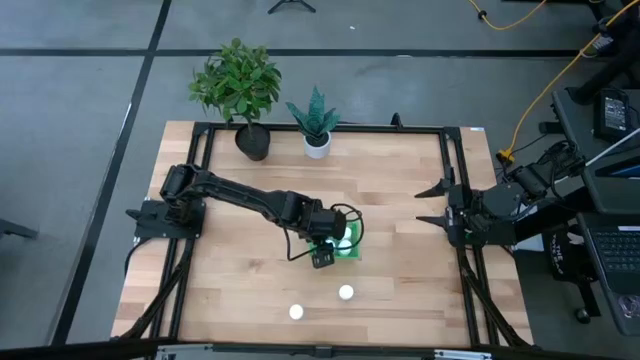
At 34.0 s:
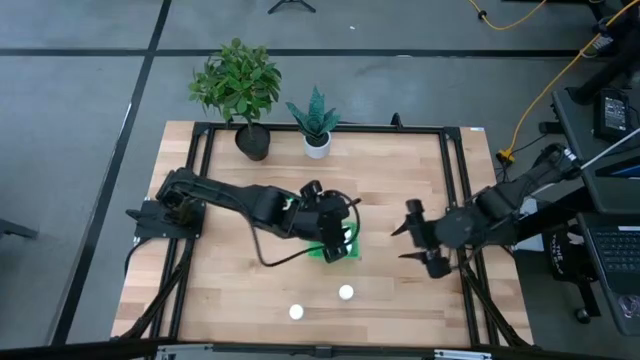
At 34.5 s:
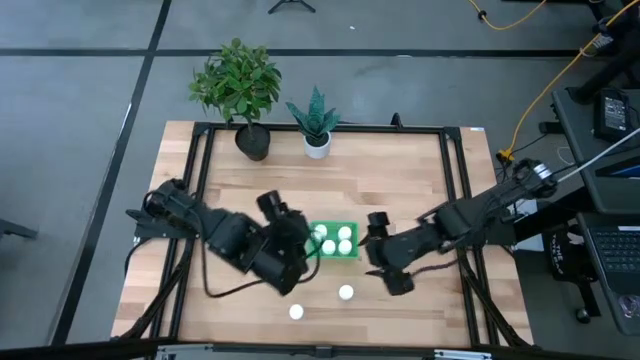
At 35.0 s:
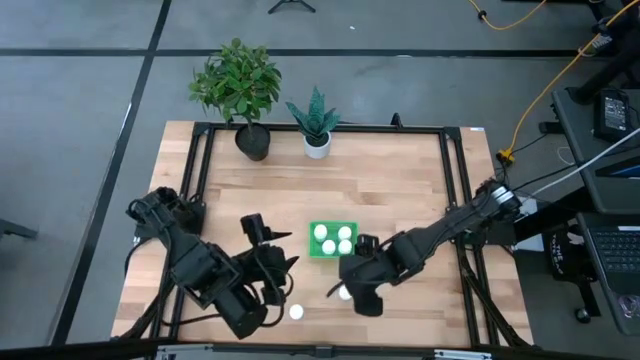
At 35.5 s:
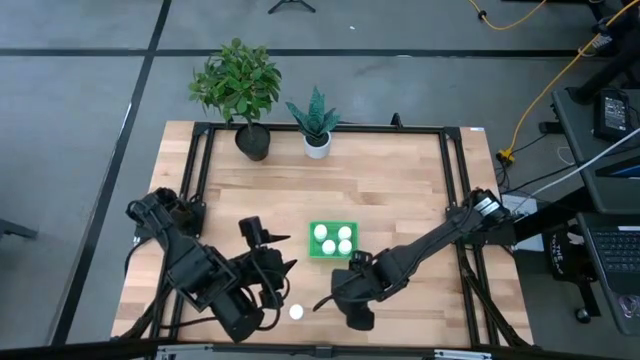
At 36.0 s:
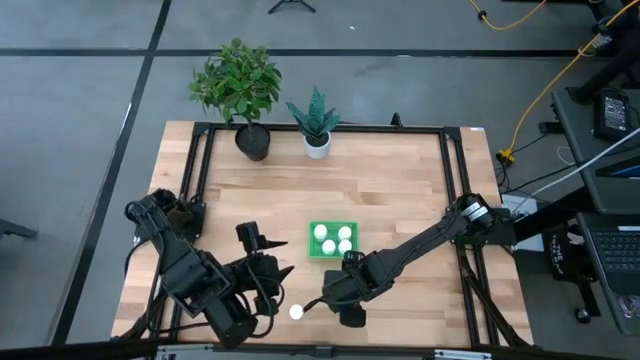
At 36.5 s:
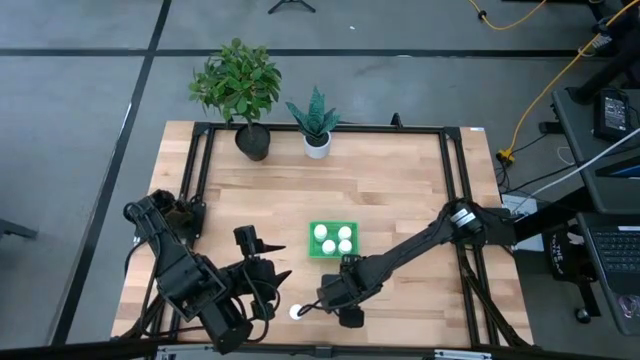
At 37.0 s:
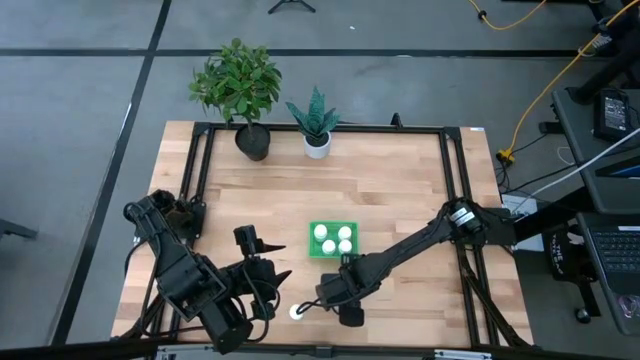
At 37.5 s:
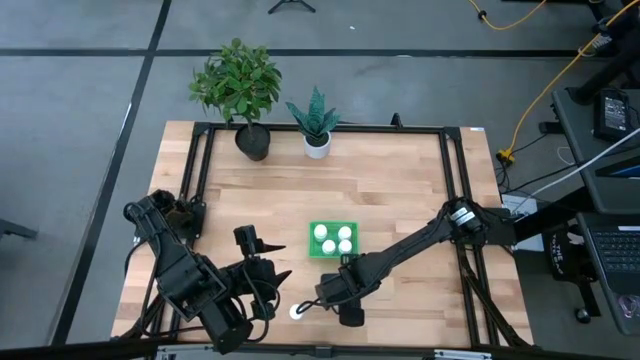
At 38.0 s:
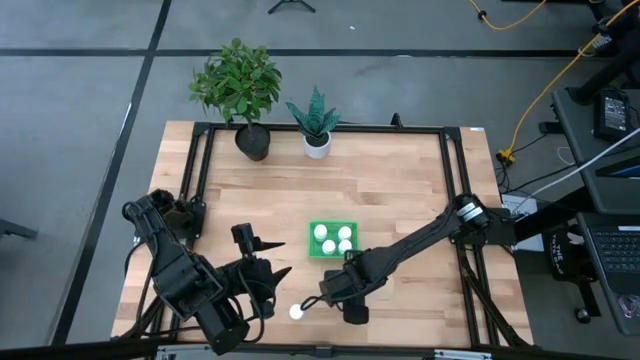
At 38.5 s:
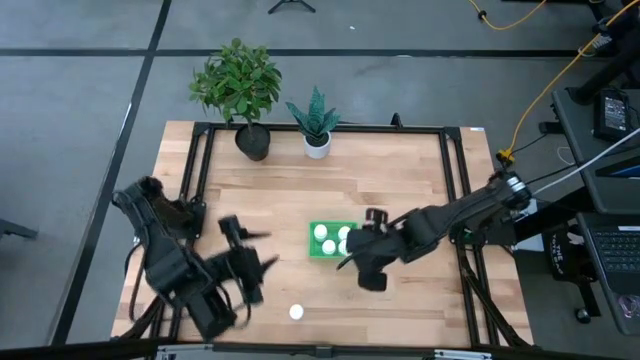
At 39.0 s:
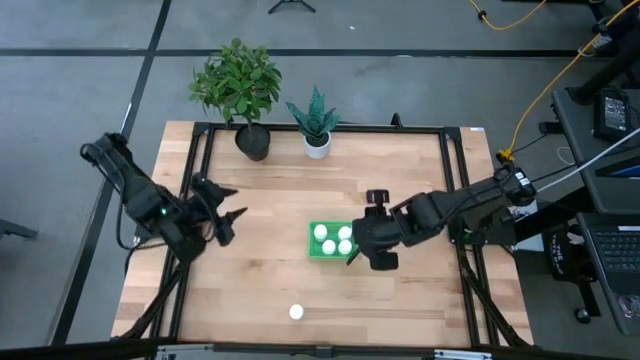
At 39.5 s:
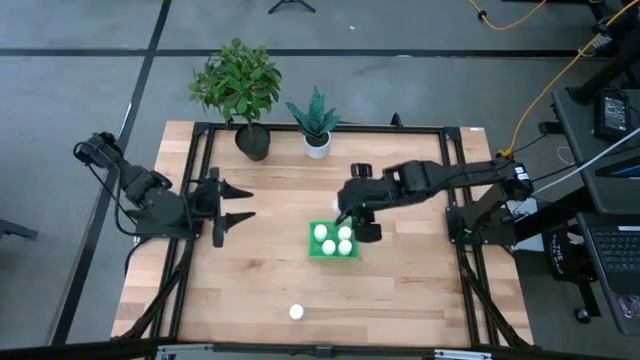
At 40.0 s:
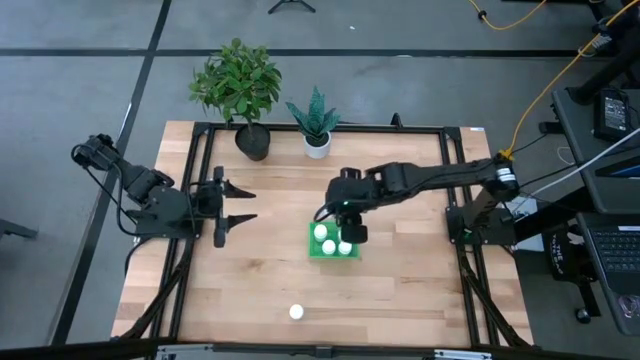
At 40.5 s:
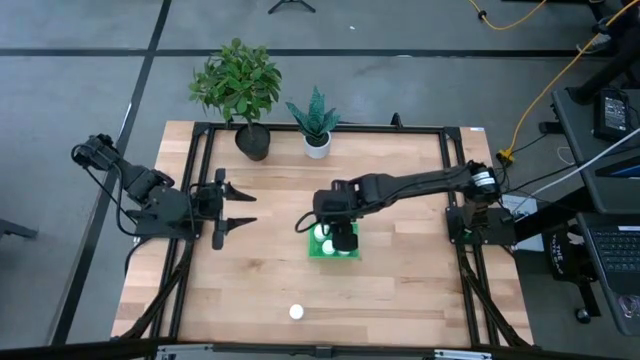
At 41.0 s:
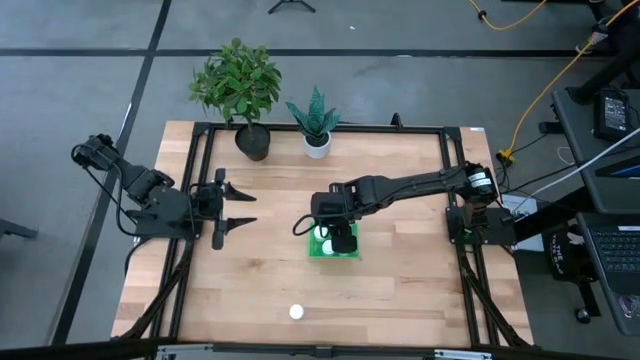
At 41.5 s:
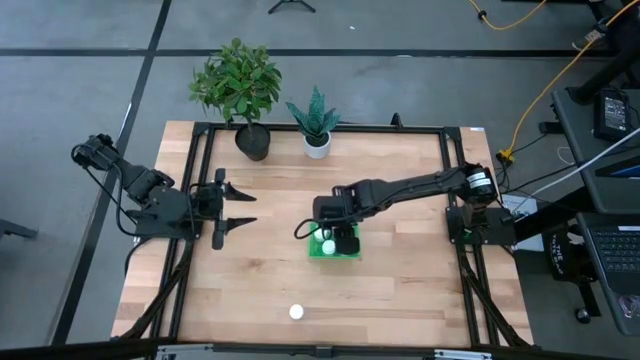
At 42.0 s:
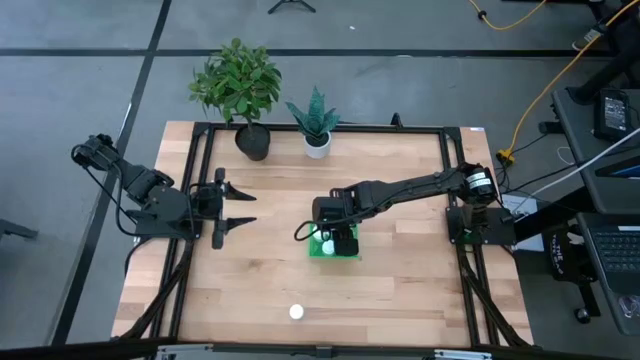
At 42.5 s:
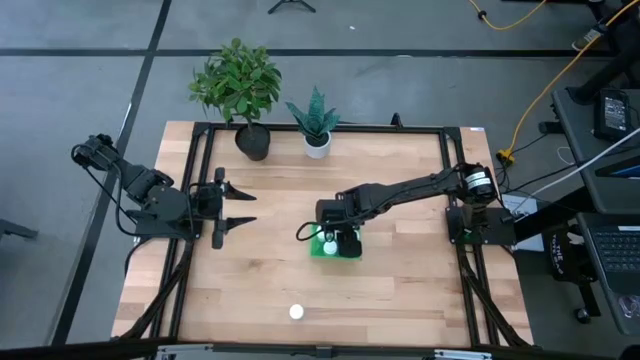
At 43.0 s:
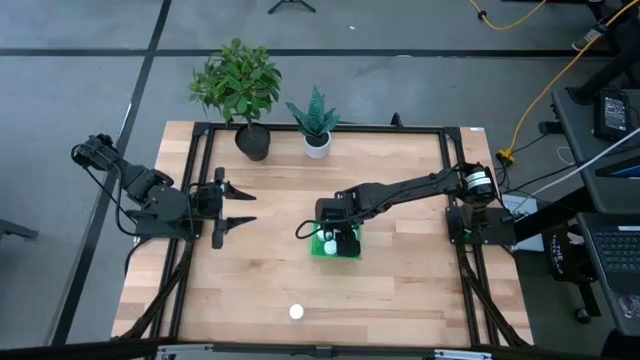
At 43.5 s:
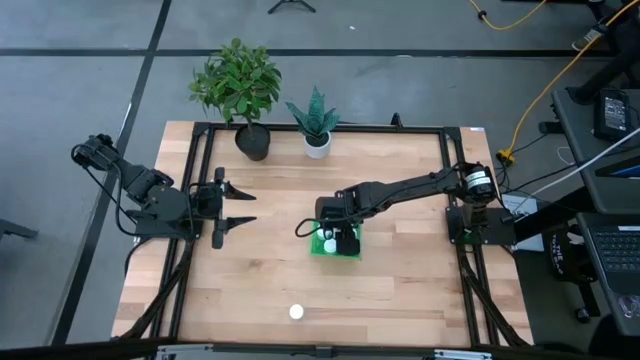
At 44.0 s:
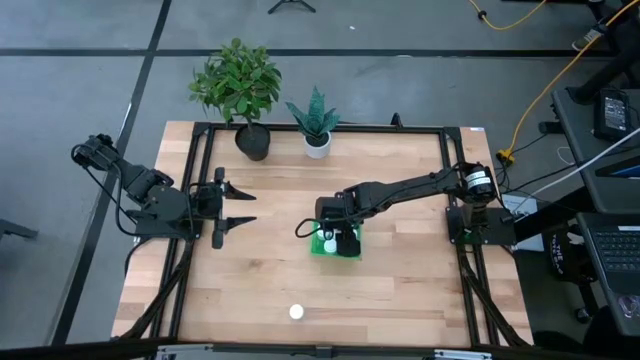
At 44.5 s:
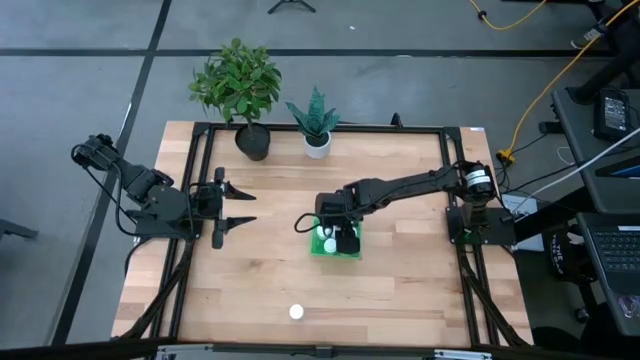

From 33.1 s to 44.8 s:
Task: Pick and place pill bottles into a basket
Put the white pill bottle into the green basket

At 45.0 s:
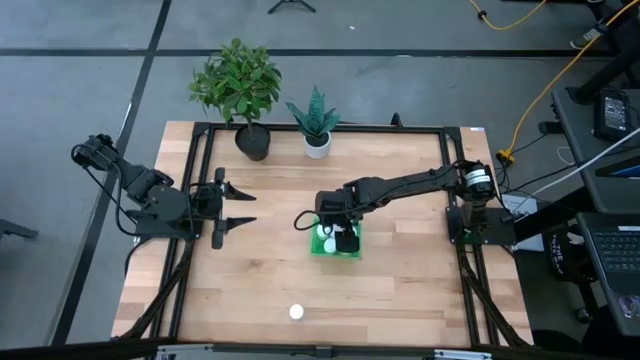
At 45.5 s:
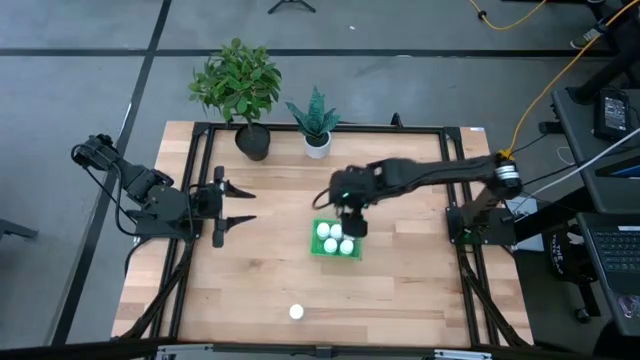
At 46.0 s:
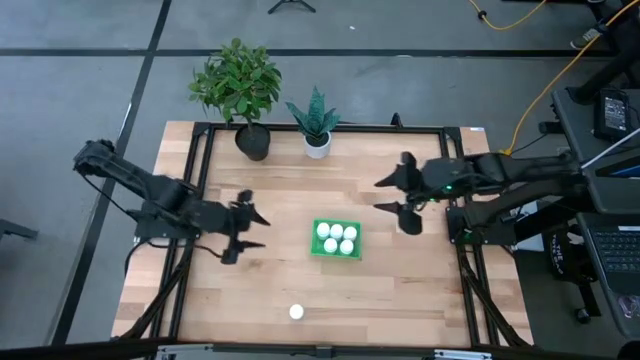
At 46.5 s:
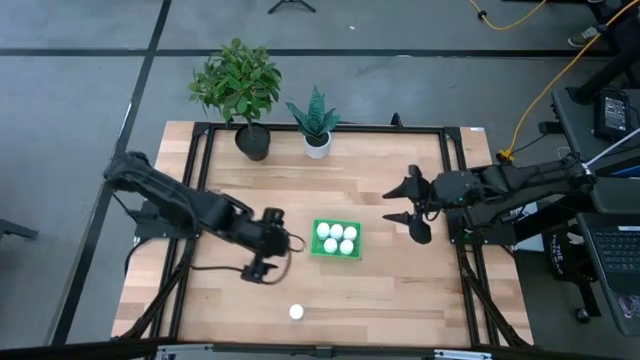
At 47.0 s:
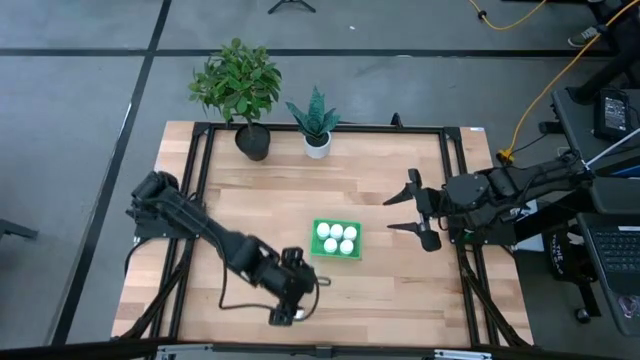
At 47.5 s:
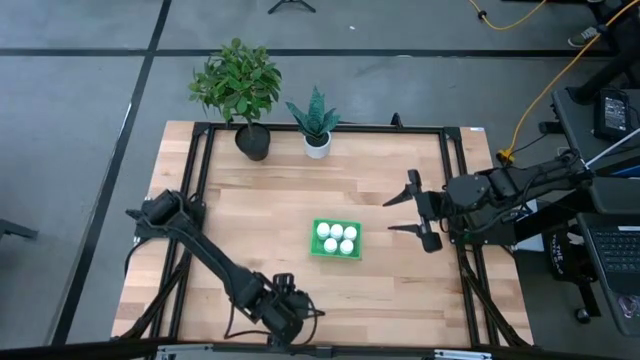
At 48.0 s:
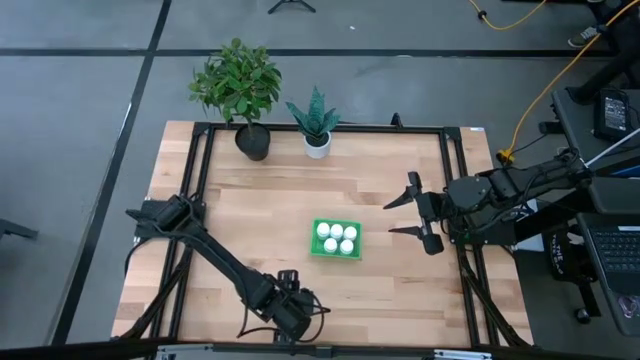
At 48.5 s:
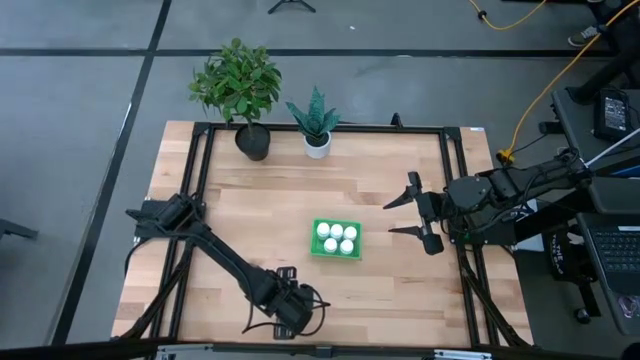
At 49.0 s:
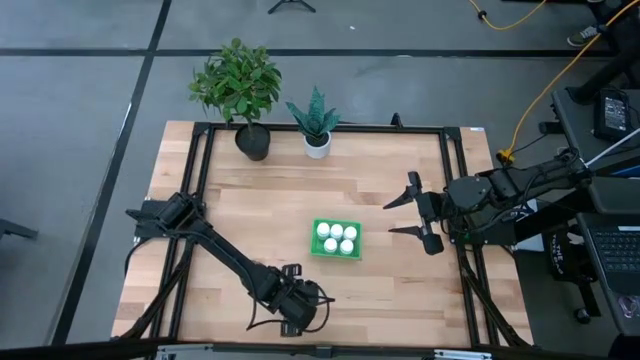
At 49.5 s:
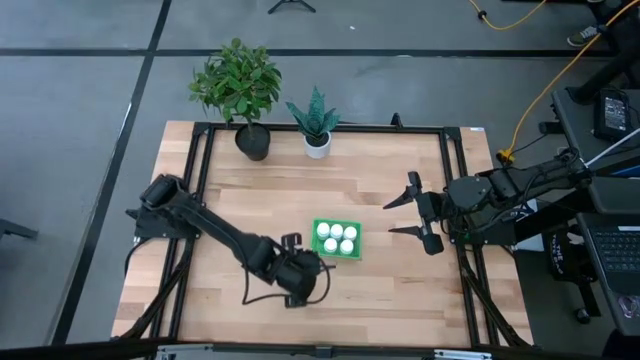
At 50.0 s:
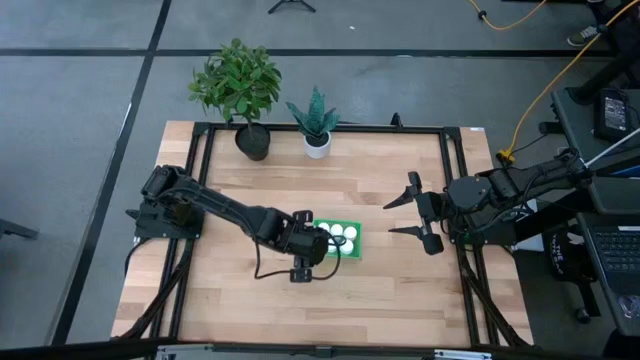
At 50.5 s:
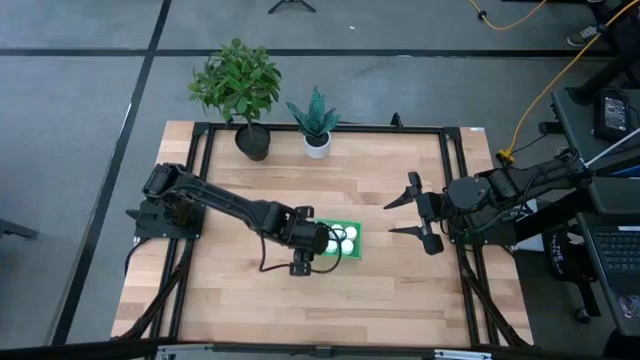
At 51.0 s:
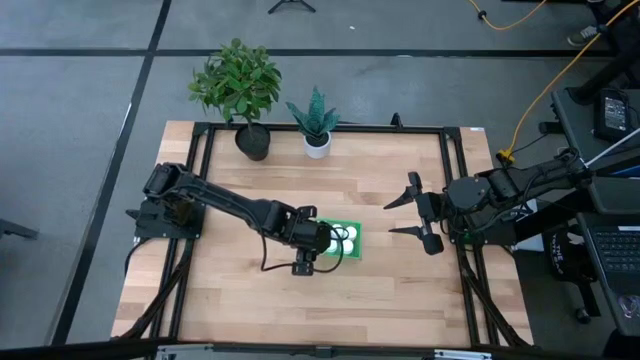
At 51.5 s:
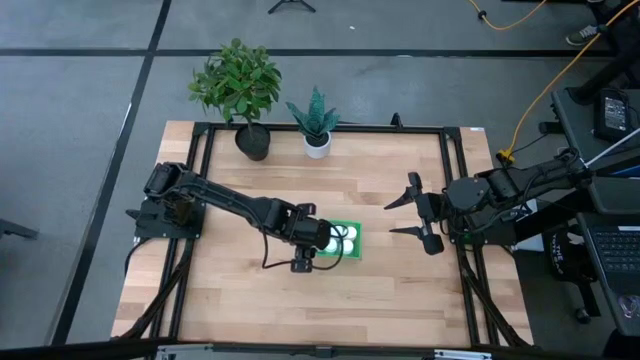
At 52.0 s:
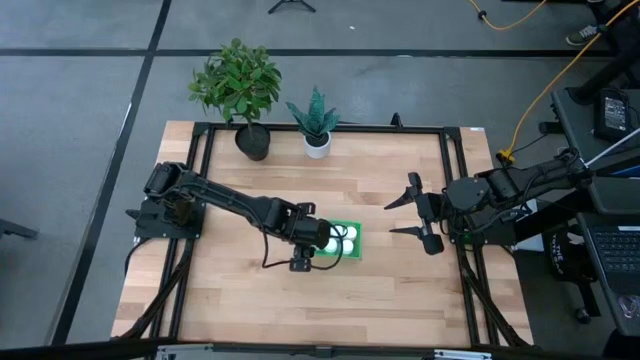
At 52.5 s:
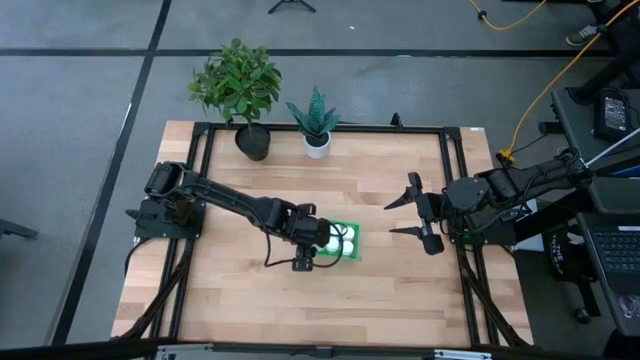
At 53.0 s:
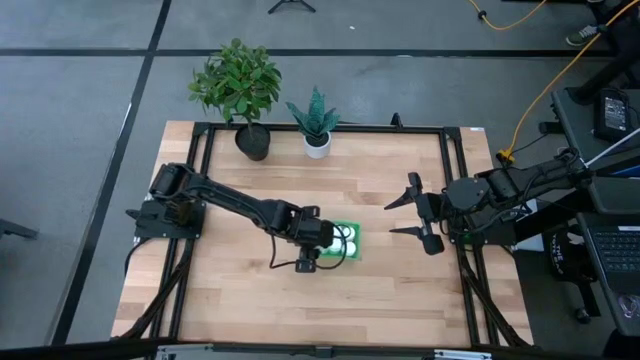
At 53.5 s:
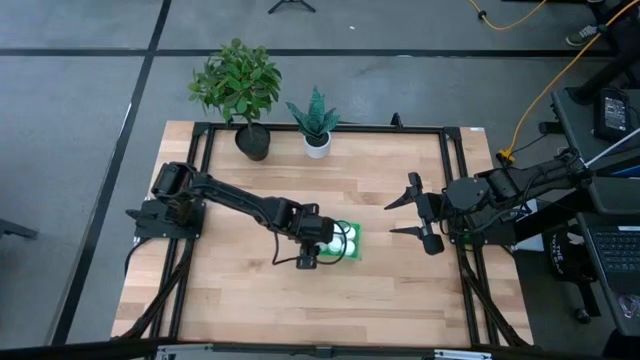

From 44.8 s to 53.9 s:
Put the white pill bottle into the green basket
